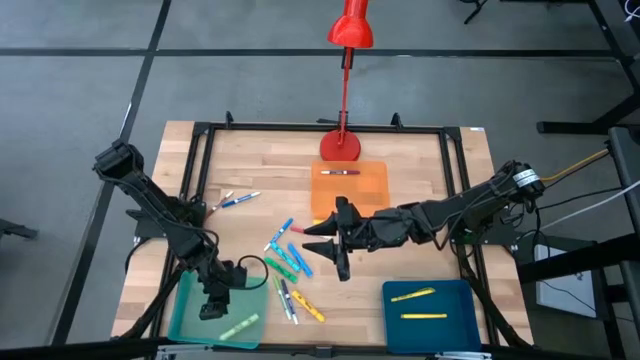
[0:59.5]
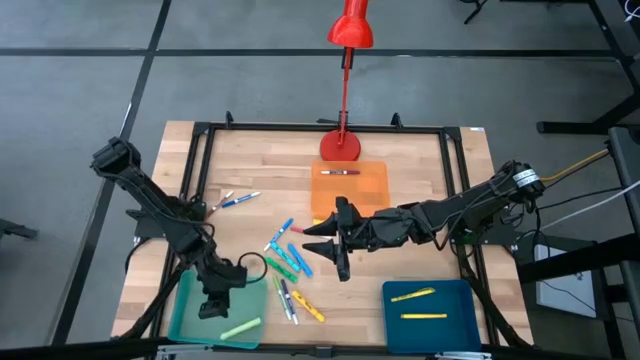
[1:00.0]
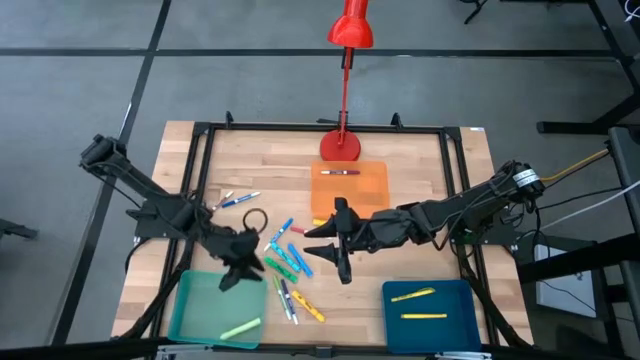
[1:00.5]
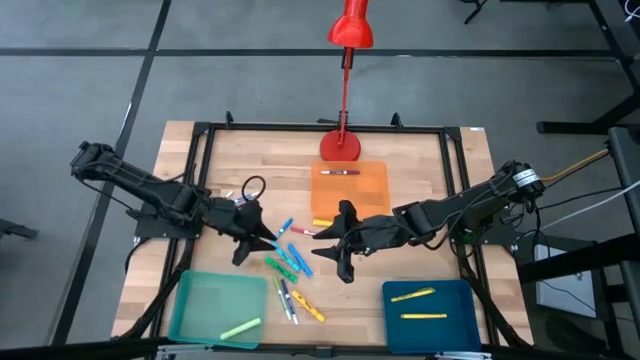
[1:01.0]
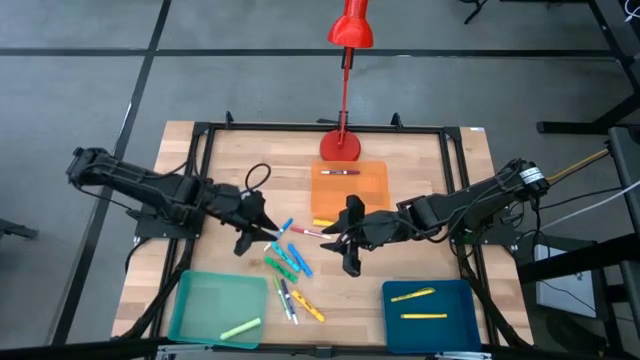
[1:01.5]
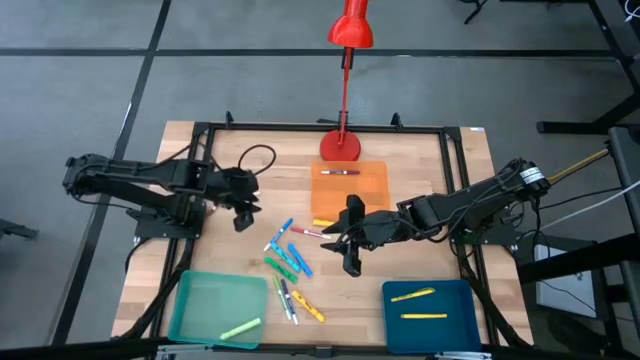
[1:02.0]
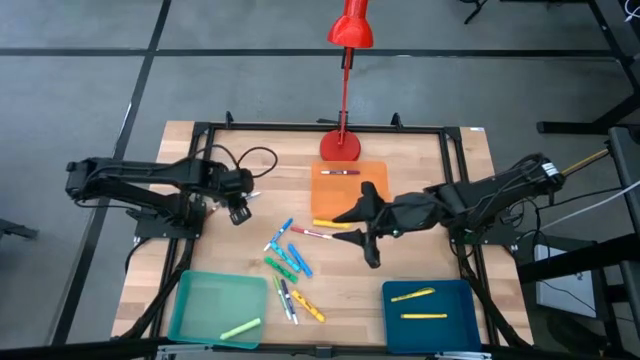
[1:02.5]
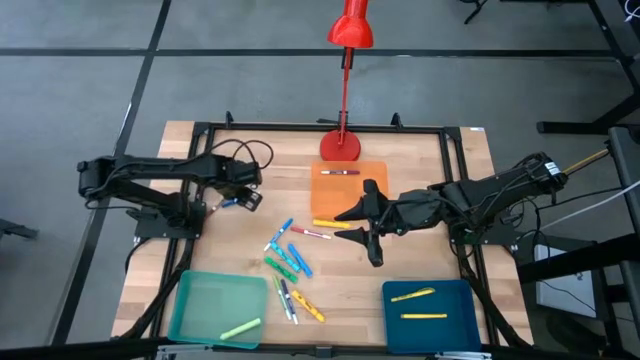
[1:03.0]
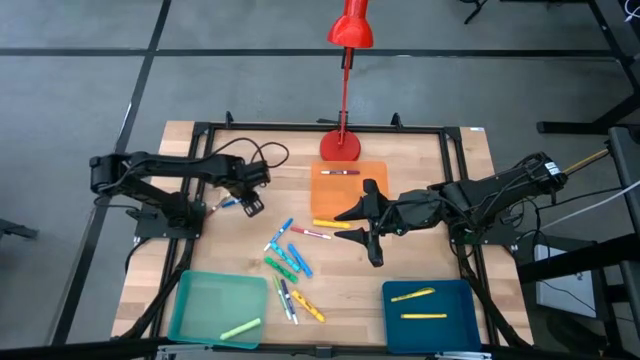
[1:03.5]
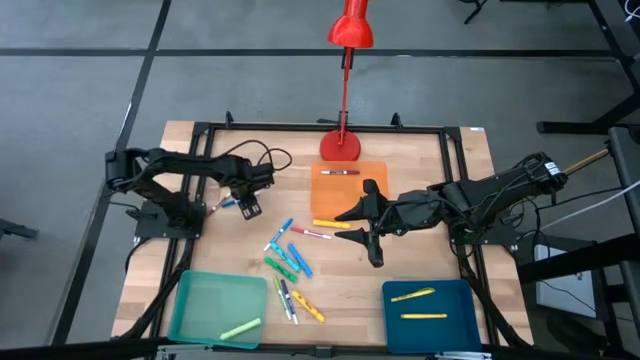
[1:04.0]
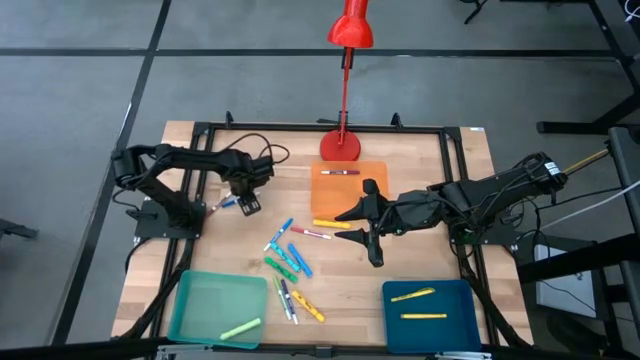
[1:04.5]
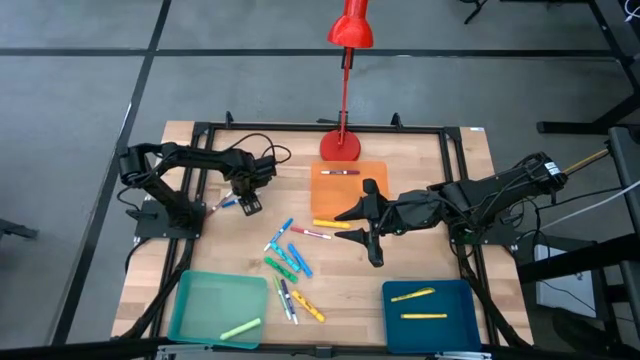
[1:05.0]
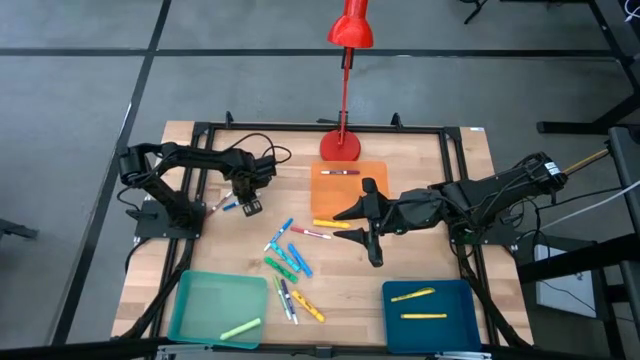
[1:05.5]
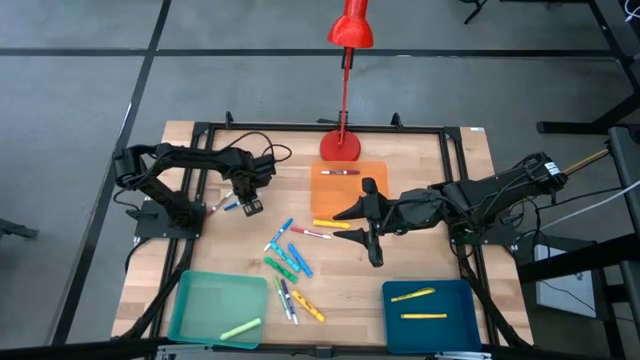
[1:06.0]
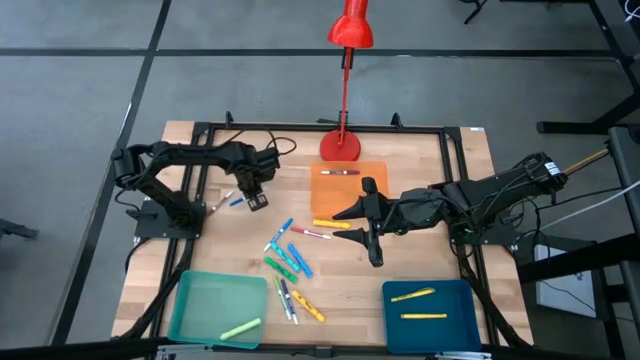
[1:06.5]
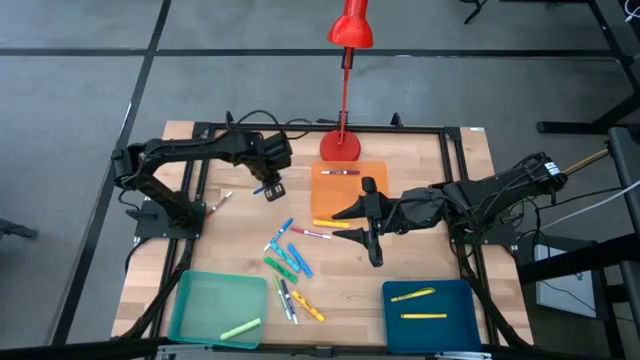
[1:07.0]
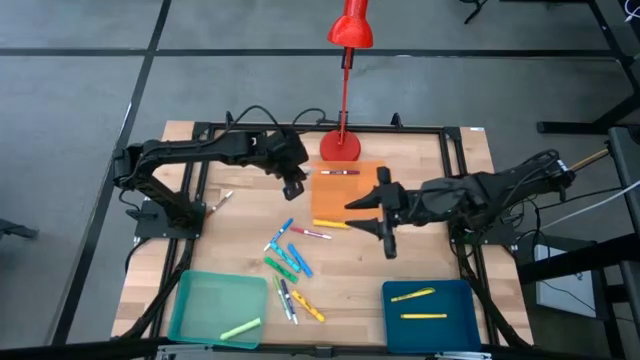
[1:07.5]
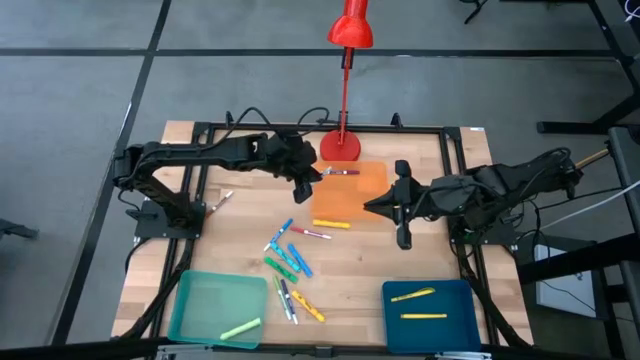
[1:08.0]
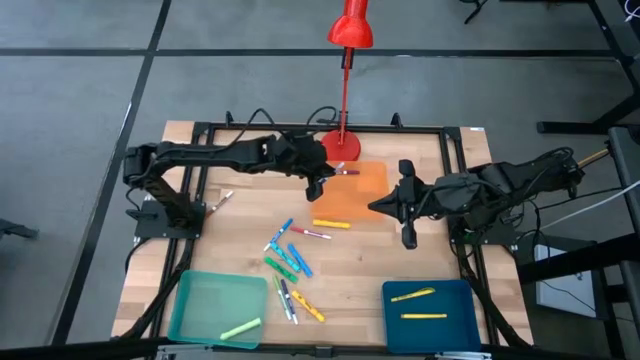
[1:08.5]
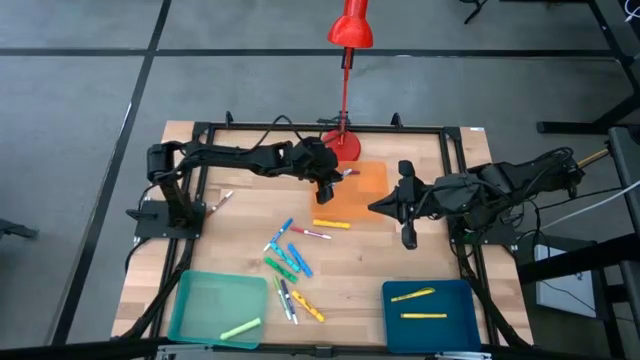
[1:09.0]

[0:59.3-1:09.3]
Task: Pick & Place Markers
Put the top blue marker pen into the orange bin

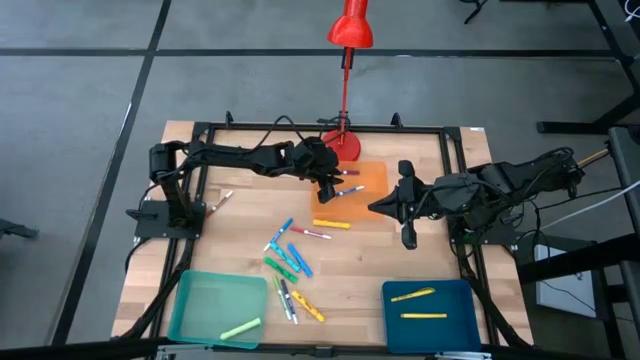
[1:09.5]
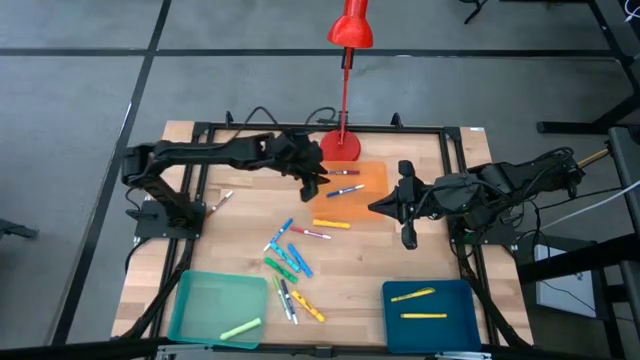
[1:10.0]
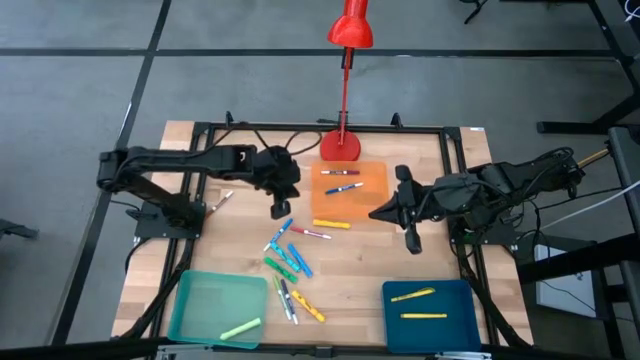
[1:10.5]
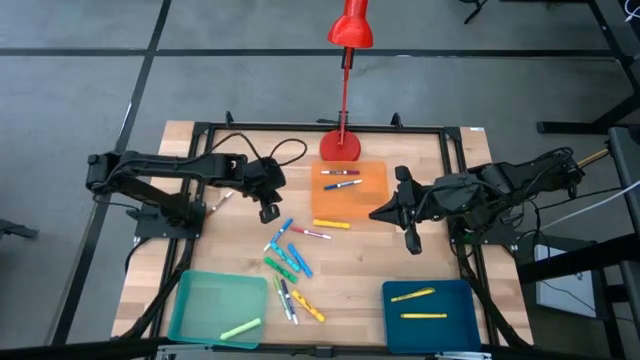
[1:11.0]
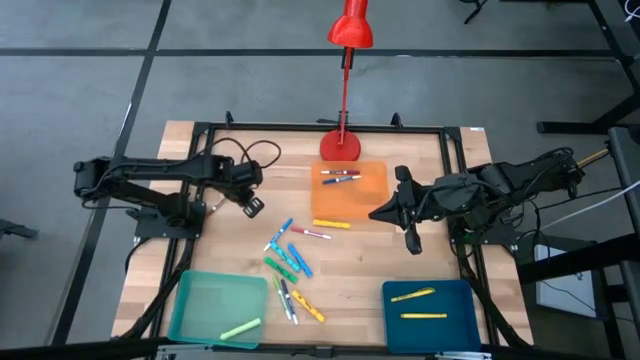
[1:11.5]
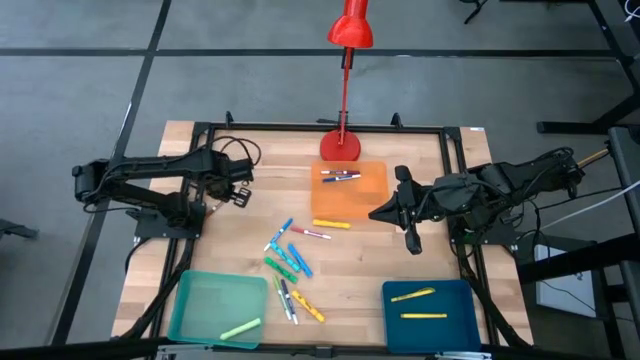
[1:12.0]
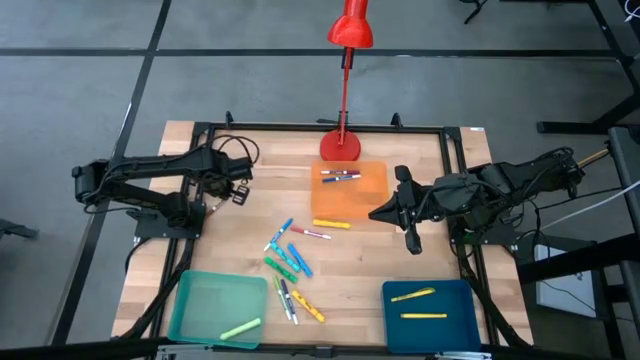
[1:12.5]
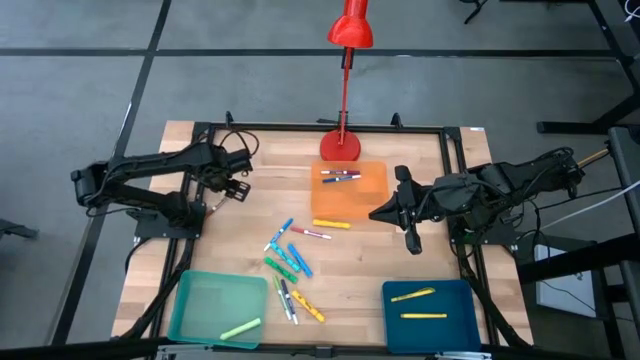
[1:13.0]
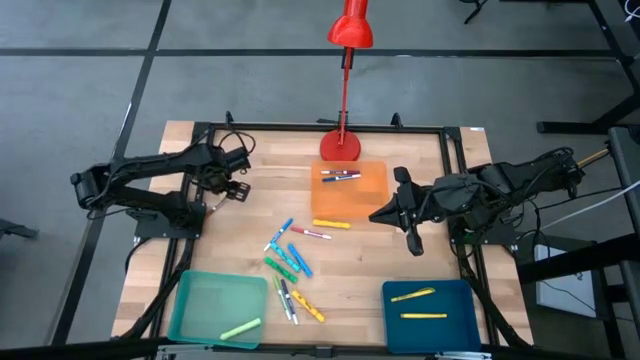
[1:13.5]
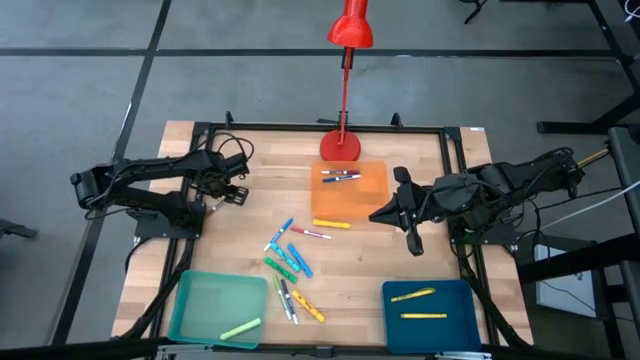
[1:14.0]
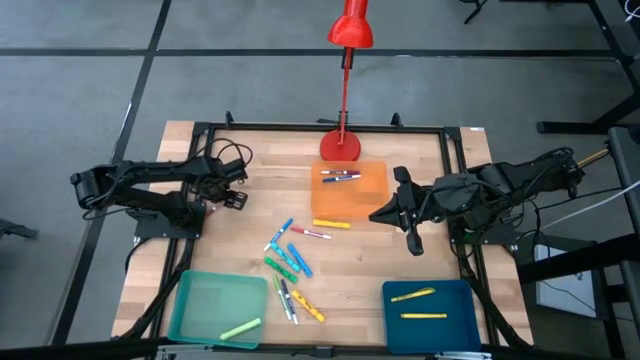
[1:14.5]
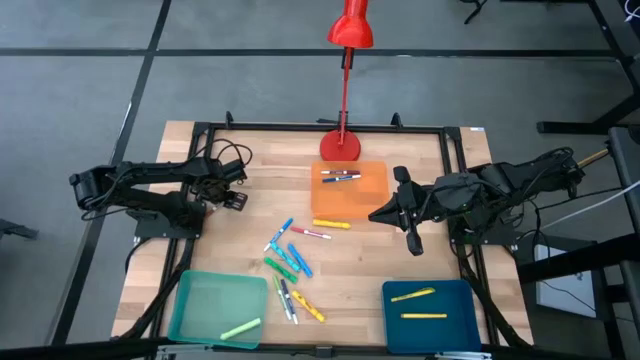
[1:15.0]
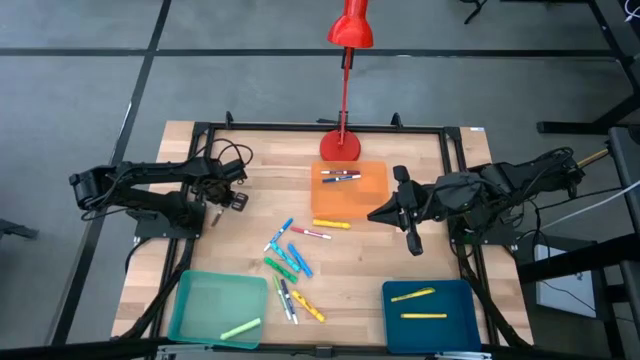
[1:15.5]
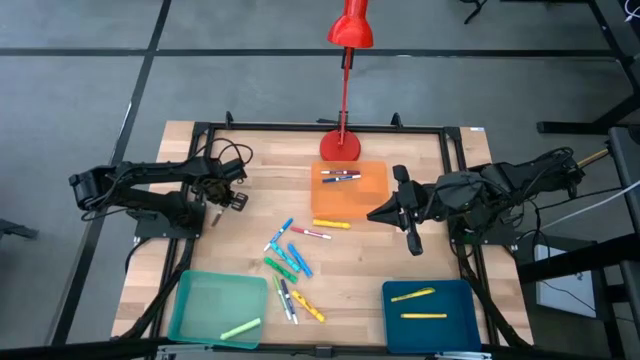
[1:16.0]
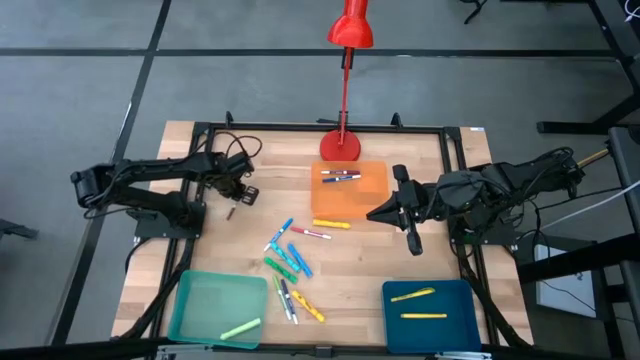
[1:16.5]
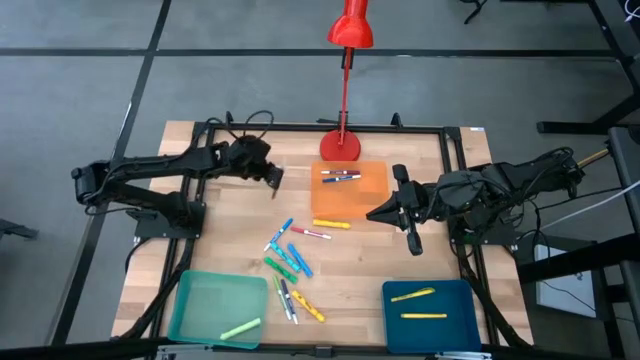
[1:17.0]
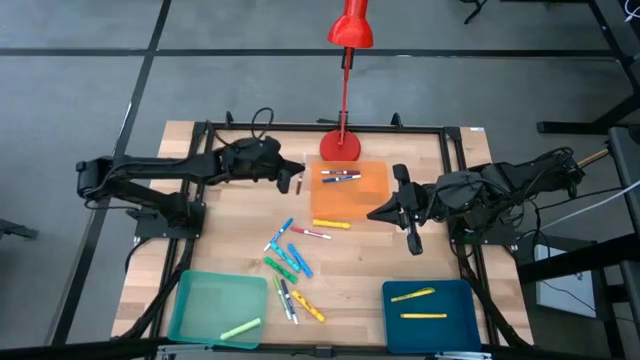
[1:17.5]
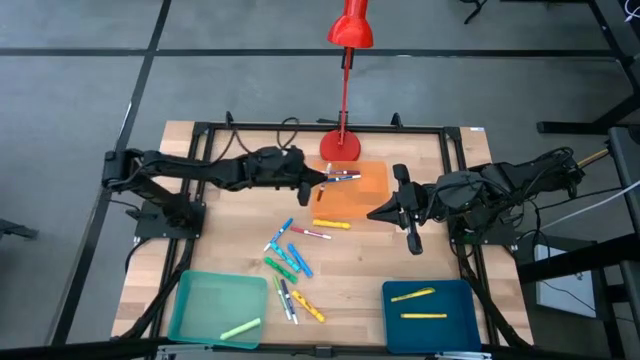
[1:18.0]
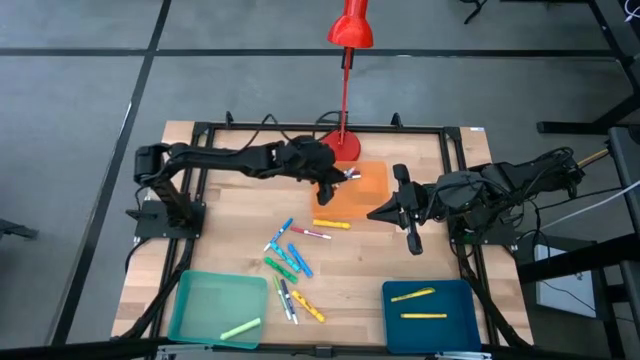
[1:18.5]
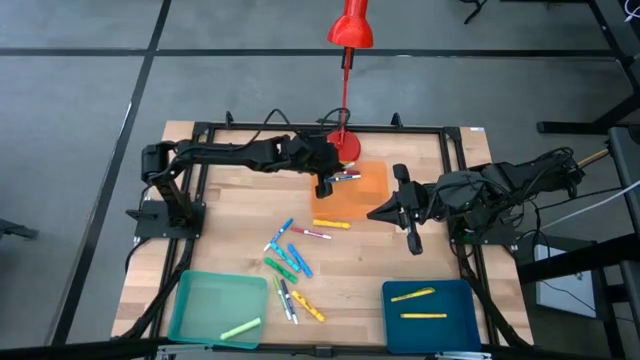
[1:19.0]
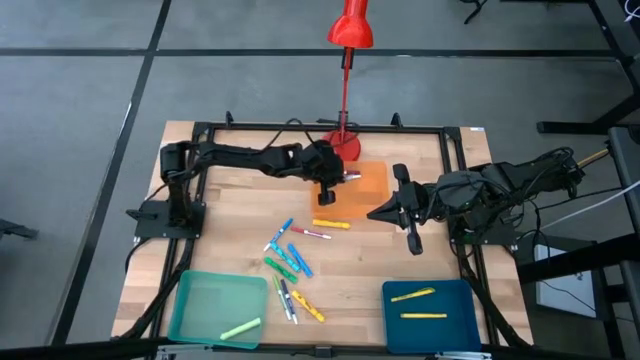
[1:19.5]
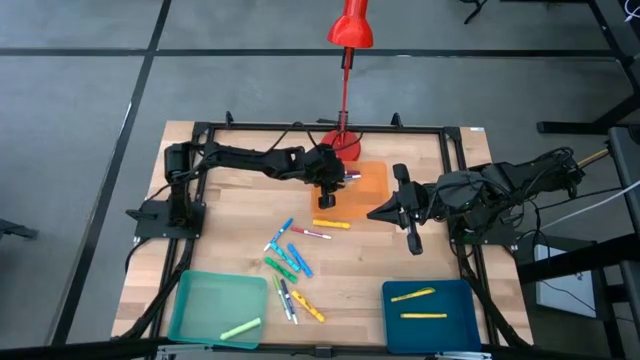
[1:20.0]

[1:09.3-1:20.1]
Put the brown marker pen into the orange bin
